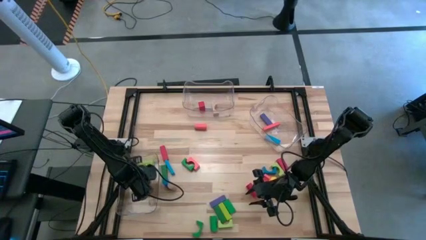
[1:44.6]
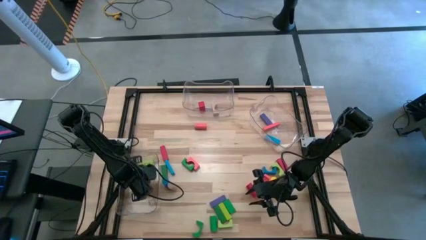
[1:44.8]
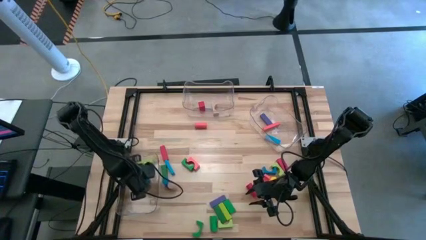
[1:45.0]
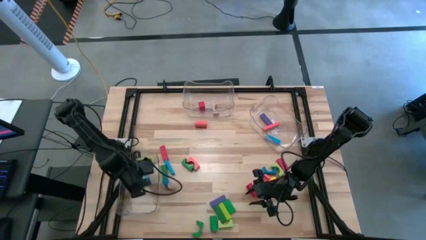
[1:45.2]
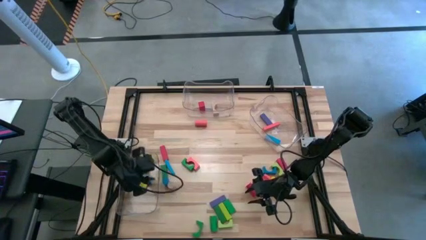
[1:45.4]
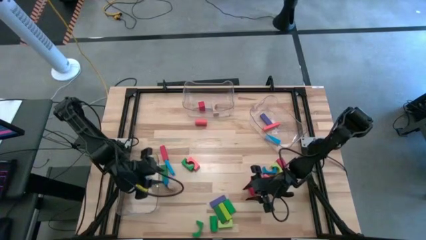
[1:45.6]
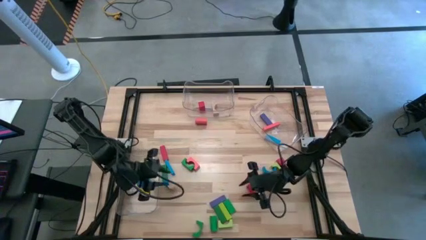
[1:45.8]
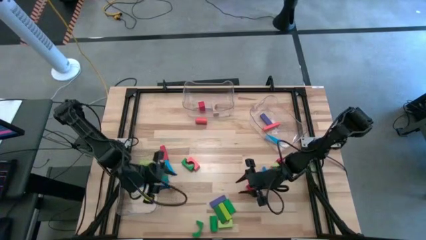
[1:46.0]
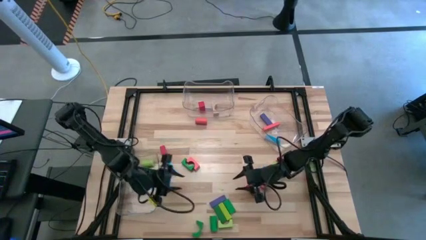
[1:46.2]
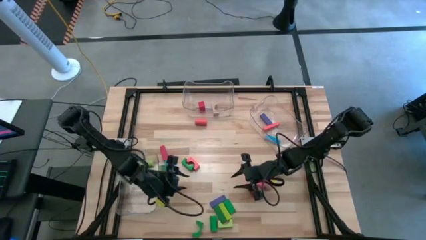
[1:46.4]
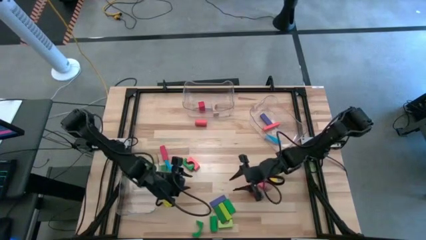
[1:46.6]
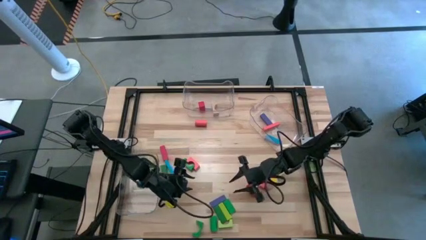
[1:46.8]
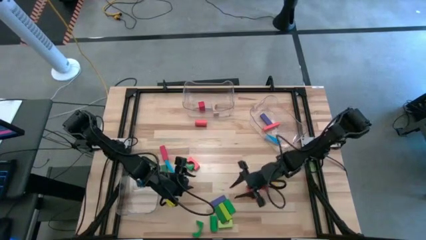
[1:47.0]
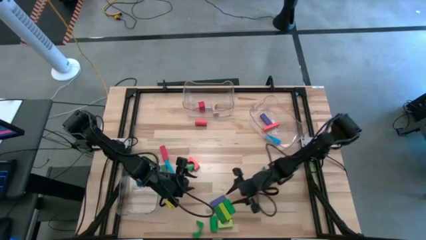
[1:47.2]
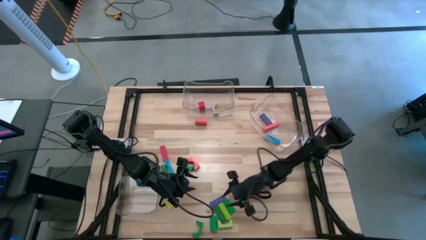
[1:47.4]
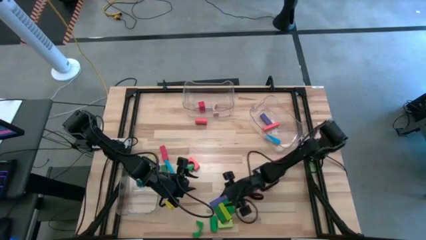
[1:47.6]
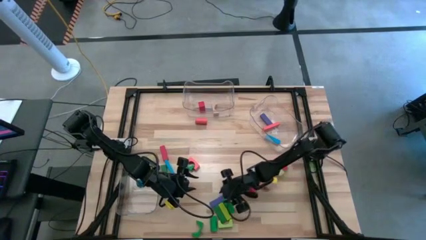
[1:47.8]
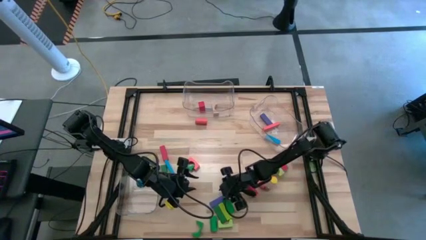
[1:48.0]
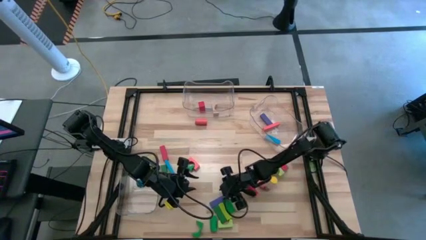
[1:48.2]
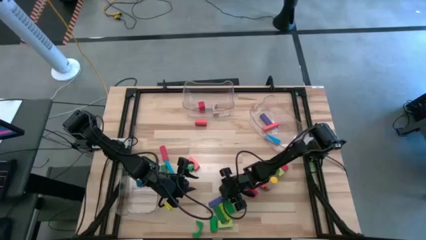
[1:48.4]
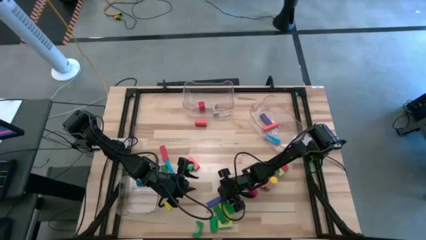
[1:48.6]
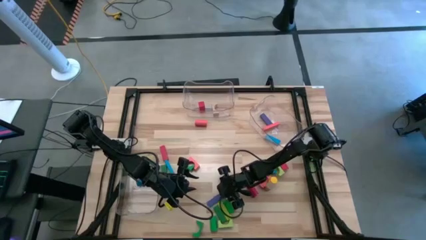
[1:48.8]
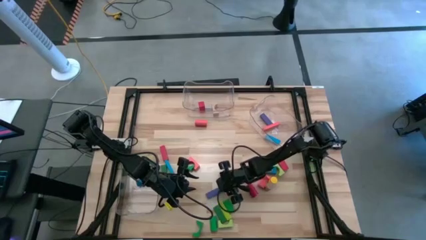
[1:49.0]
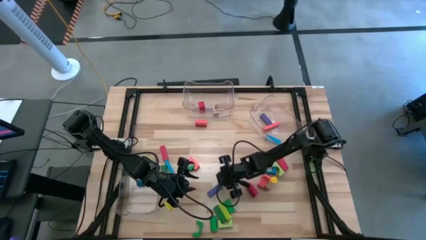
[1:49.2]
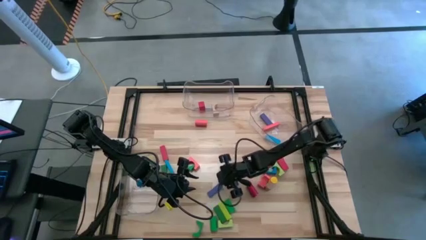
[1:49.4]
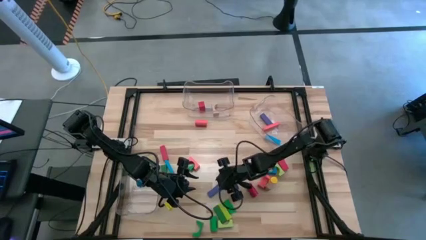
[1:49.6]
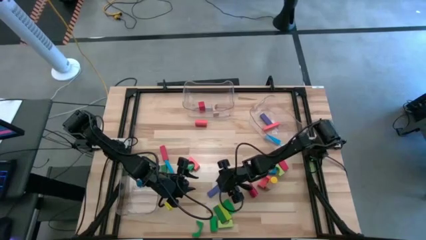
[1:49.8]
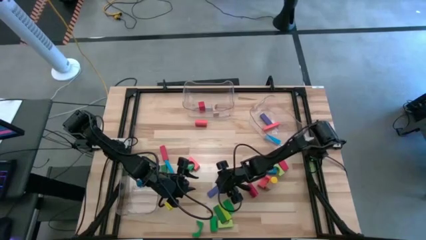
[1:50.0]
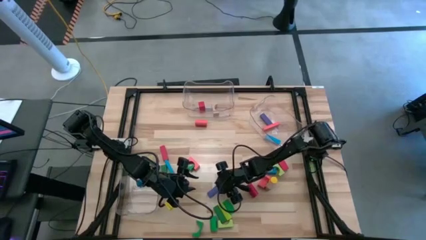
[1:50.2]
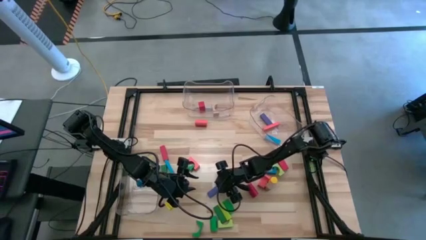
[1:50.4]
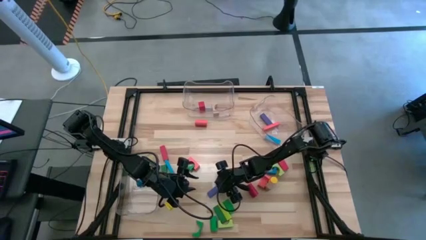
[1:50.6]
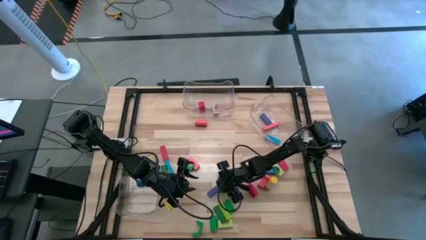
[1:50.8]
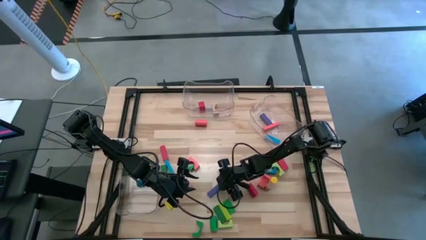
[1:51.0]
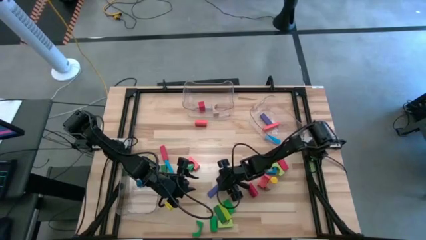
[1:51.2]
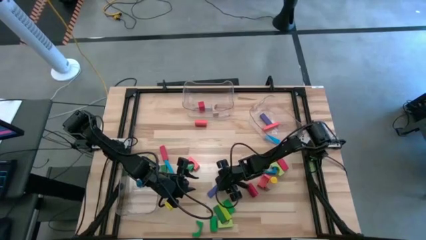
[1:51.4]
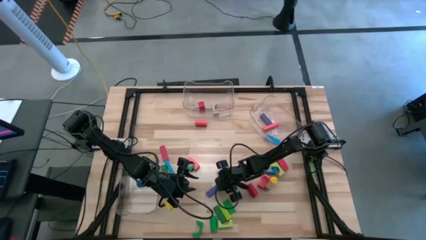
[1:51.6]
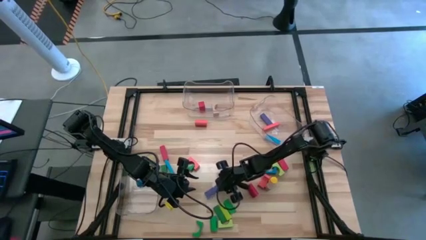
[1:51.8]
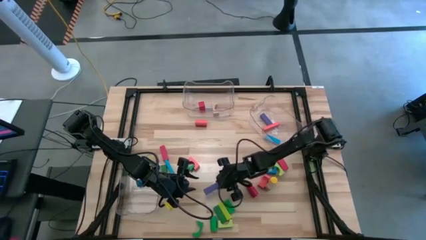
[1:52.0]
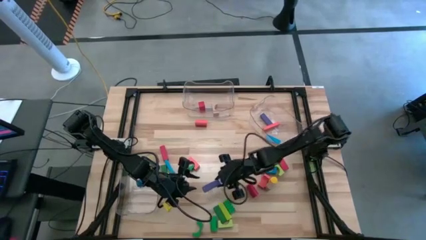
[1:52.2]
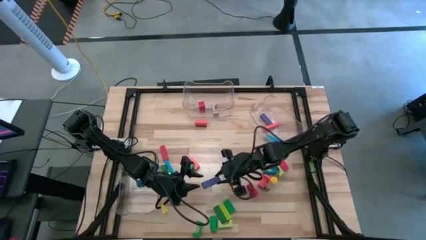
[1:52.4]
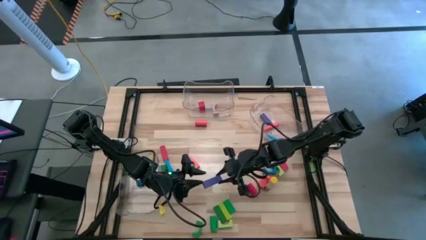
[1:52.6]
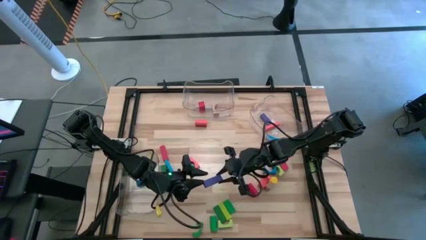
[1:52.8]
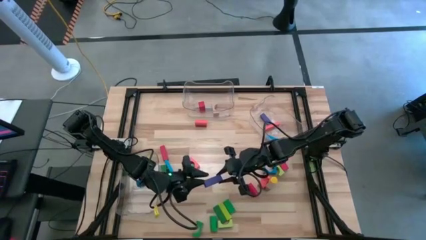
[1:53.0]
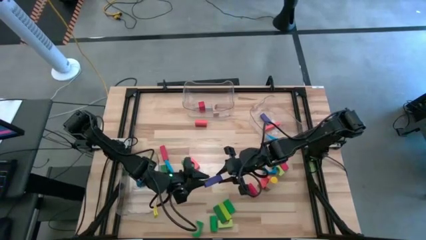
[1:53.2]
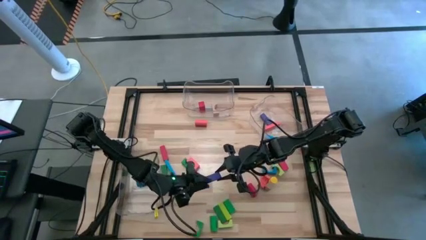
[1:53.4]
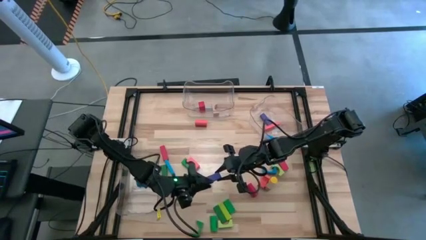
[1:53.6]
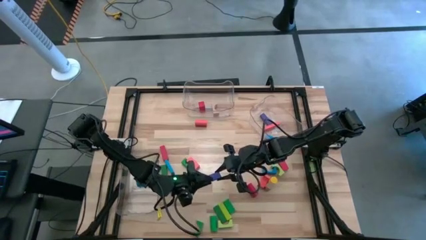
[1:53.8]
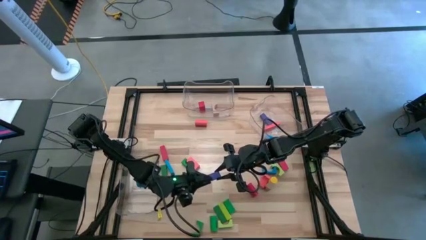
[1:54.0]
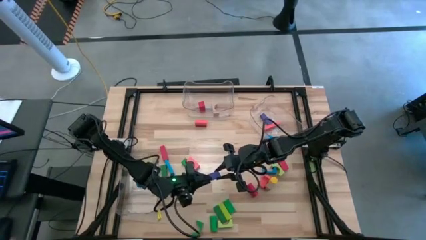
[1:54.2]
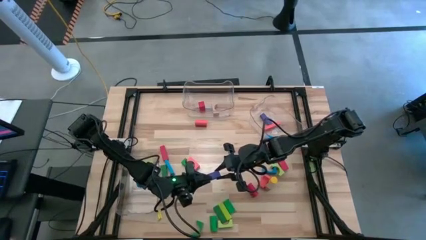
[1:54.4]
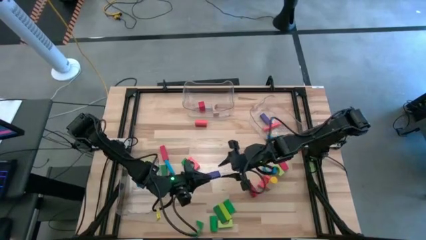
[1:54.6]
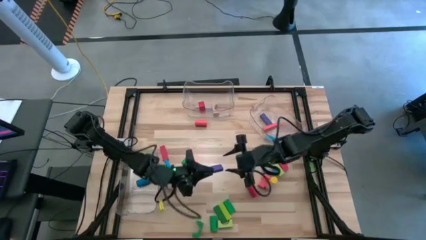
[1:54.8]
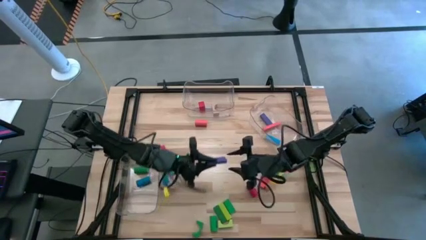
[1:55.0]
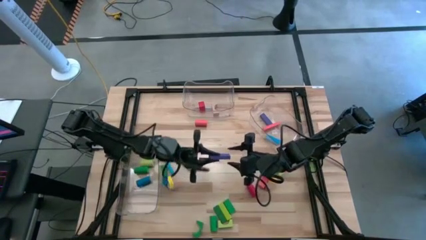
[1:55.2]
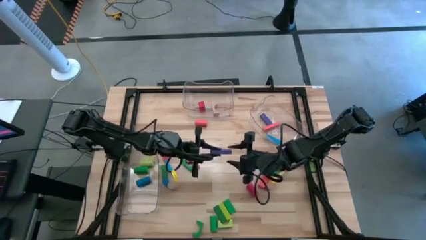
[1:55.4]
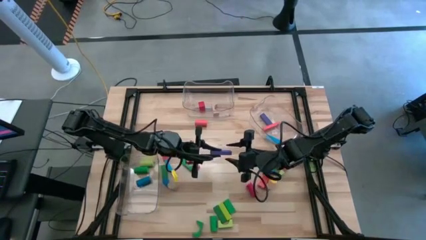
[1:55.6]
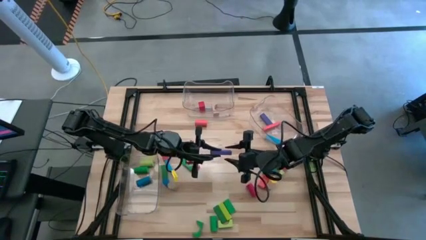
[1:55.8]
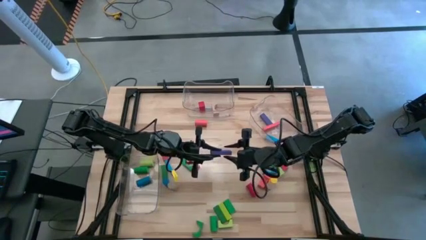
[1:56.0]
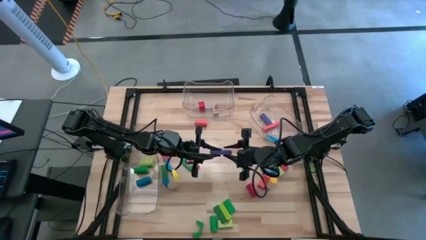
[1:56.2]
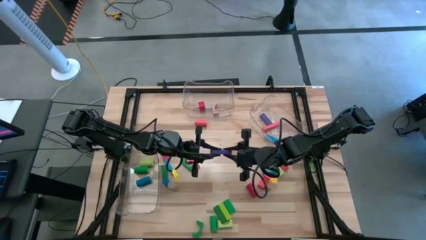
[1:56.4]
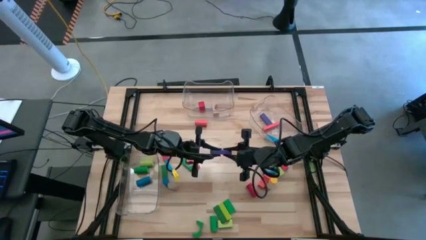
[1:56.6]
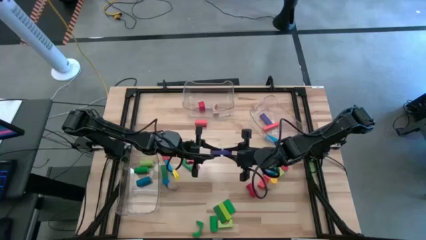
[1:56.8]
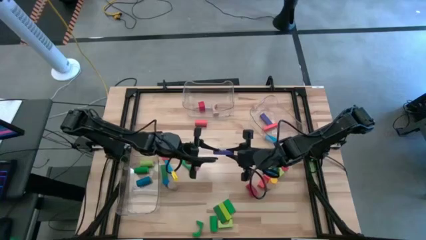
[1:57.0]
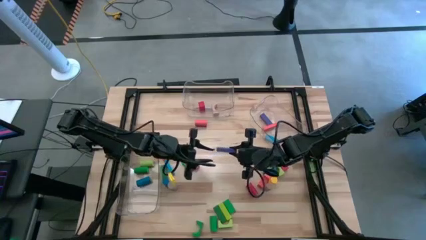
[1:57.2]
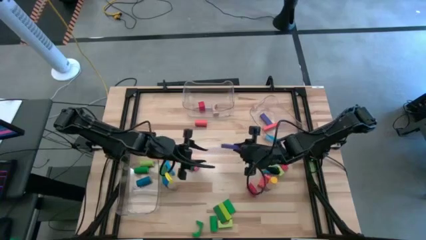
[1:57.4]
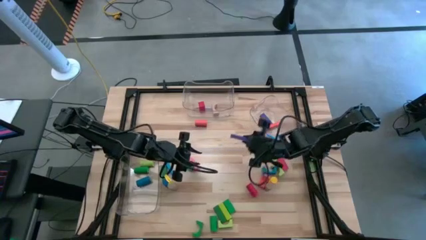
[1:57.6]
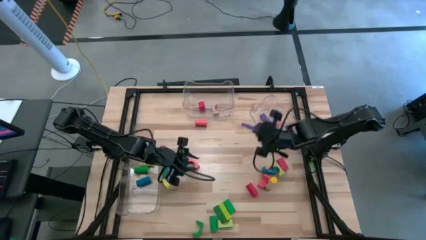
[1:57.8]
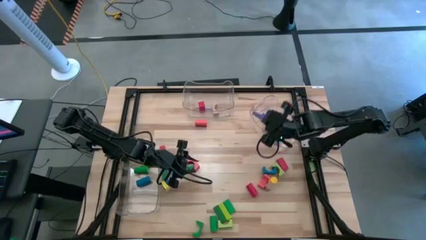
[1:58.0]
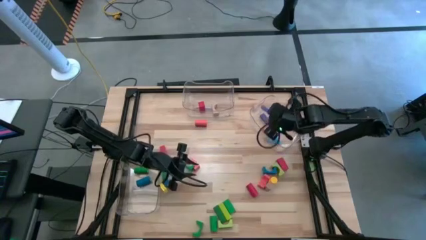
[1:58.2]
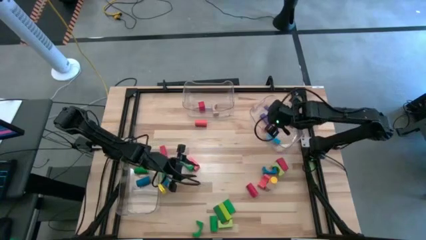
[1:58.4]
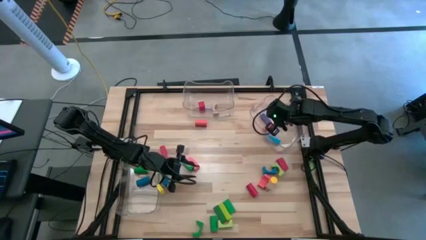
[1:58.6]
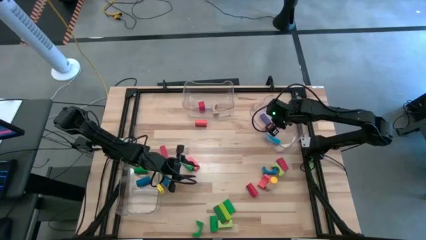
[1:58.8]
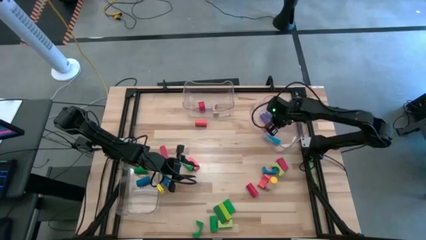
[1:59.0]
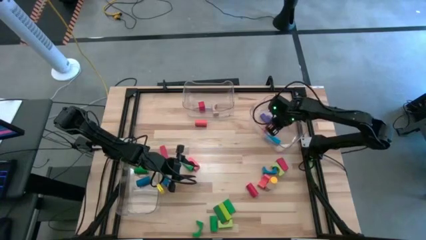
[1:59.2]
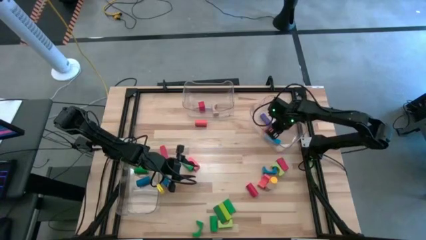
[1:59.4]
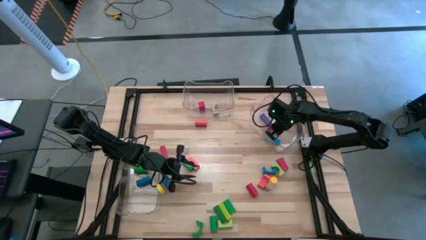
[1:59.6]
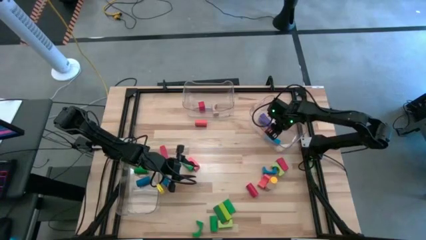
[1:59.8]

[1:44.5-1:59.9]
Task: Sort blocks by size
Put the blue rectangular block into the right transparent bin
